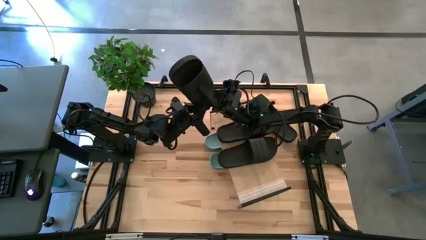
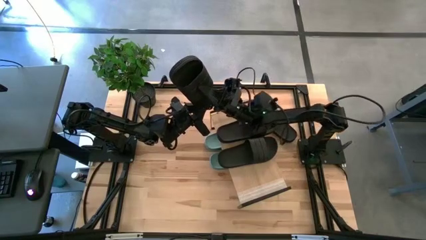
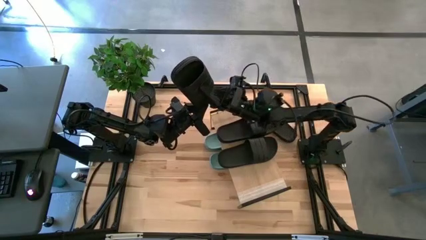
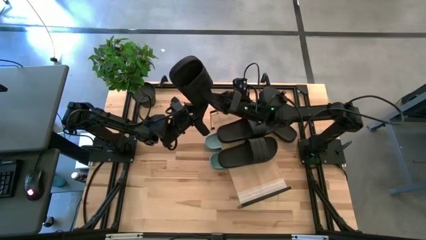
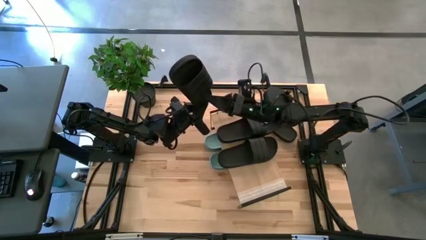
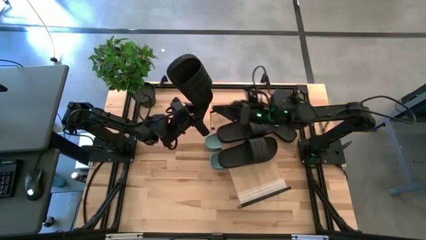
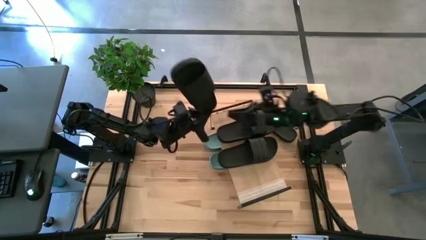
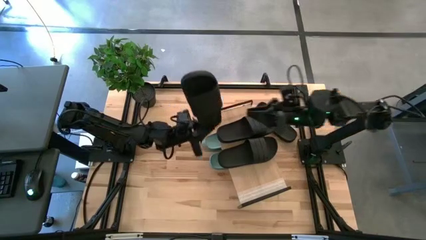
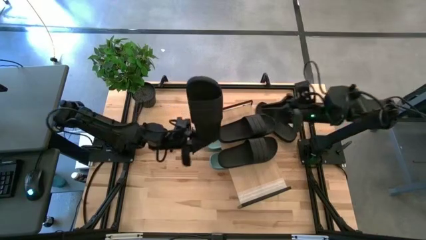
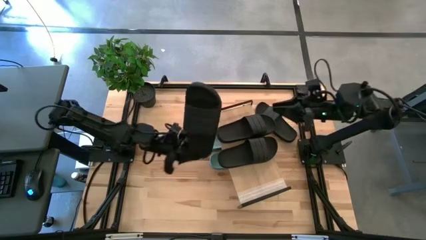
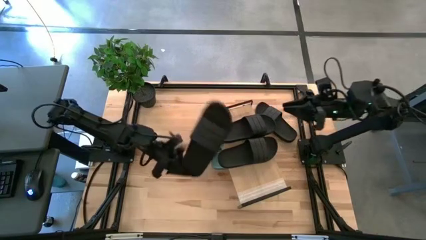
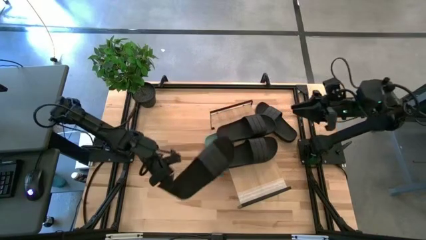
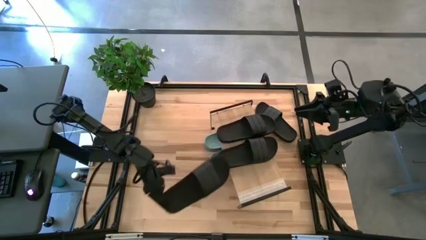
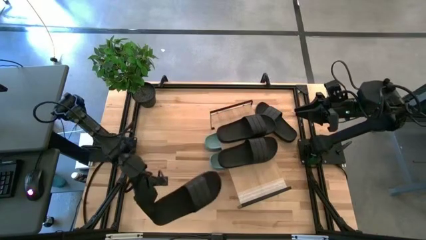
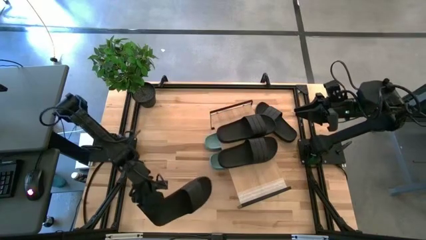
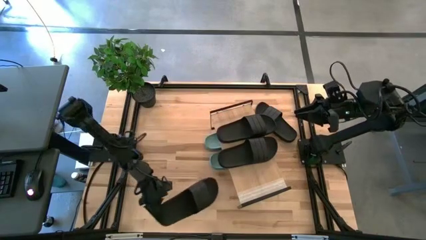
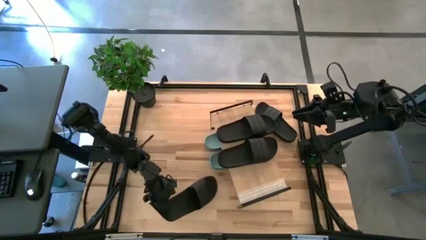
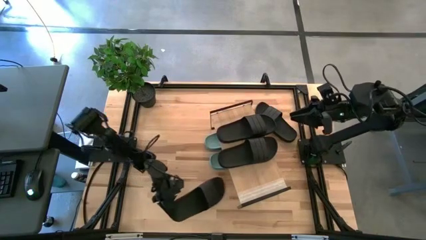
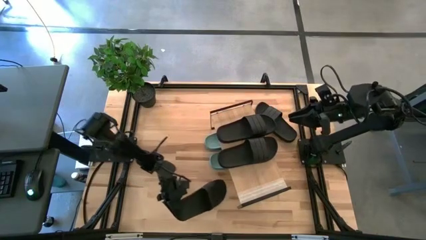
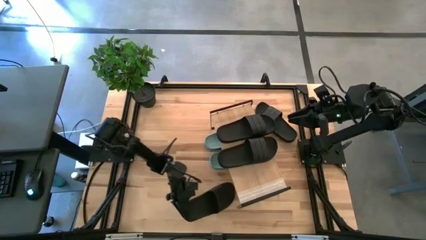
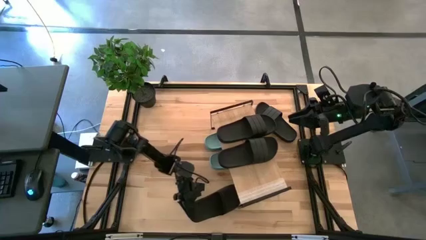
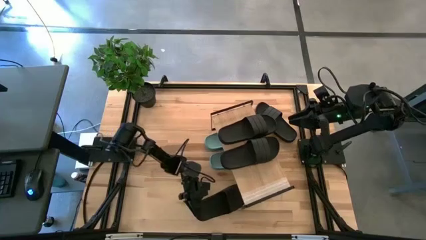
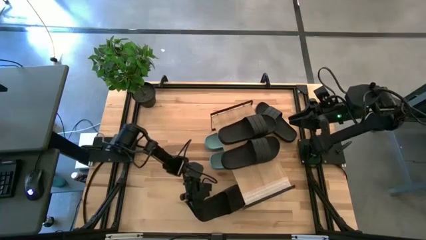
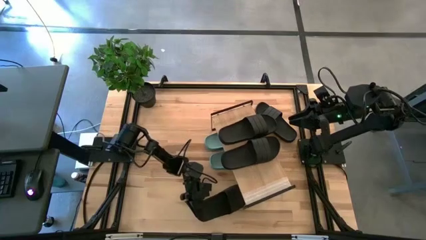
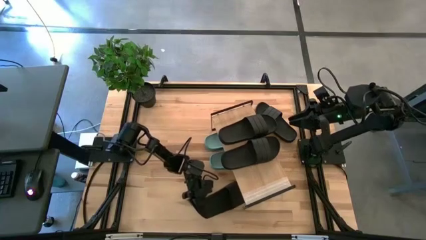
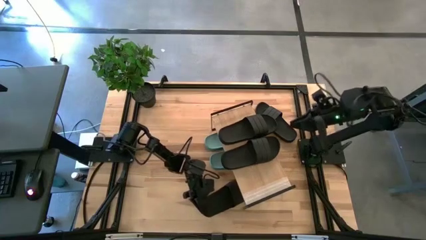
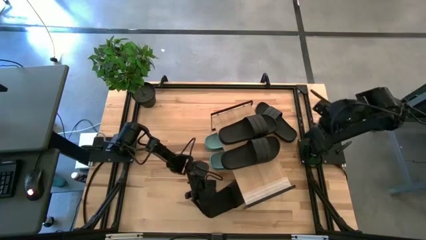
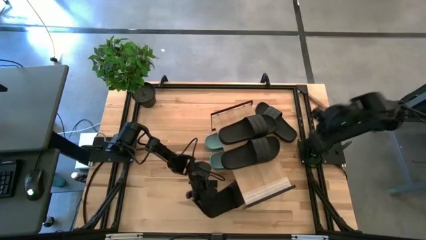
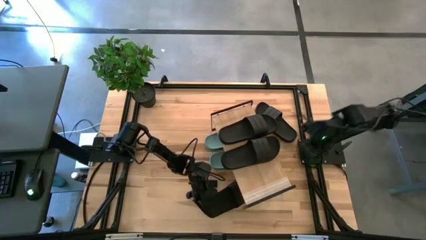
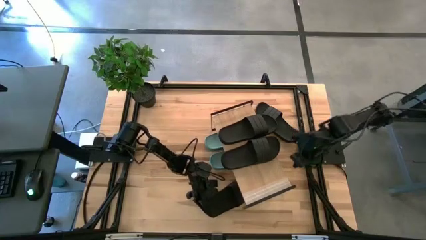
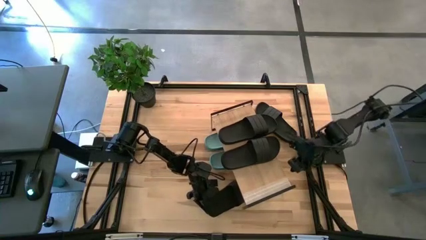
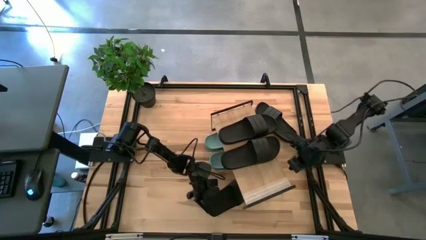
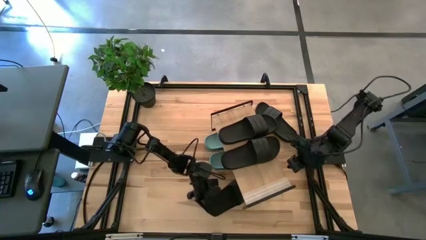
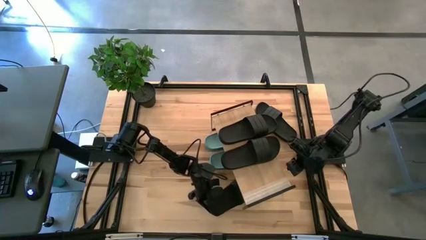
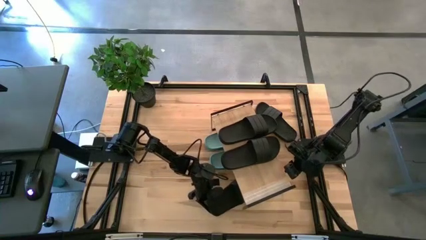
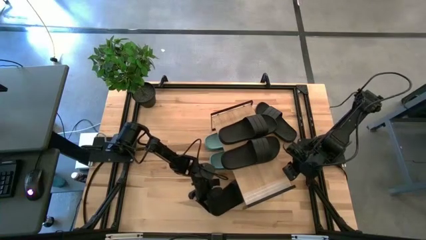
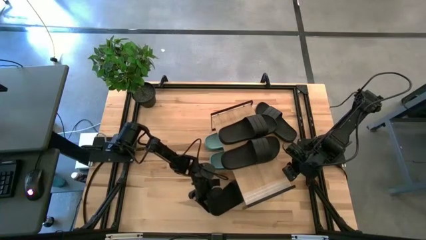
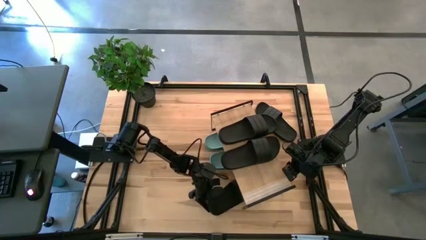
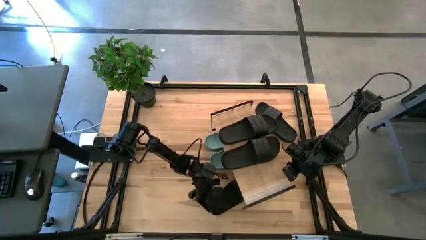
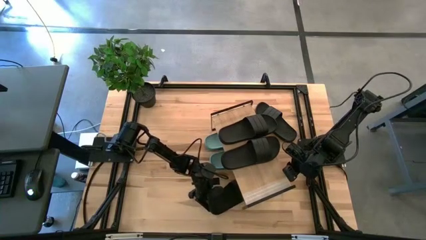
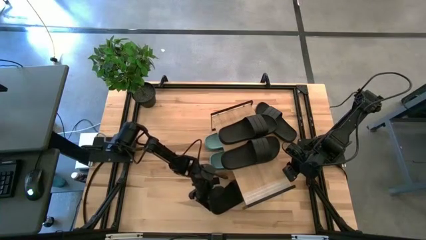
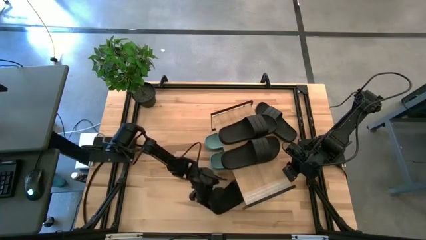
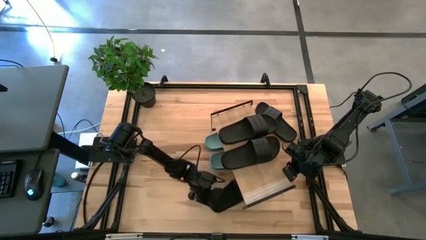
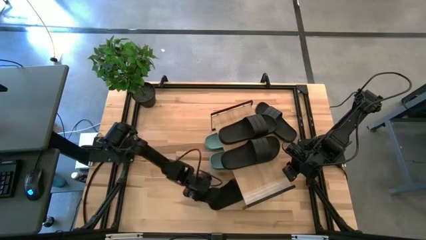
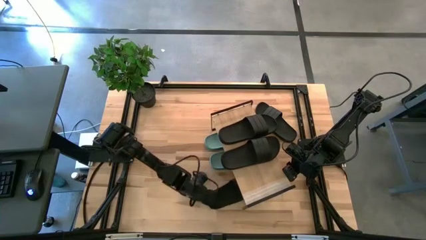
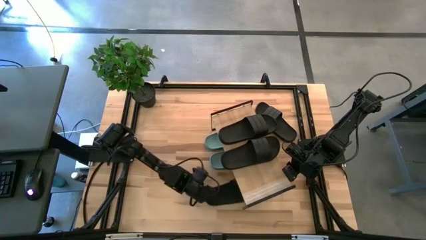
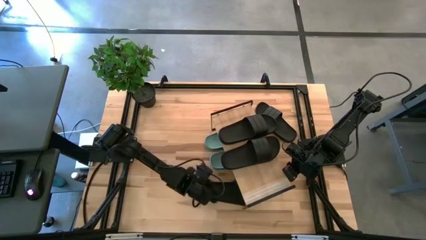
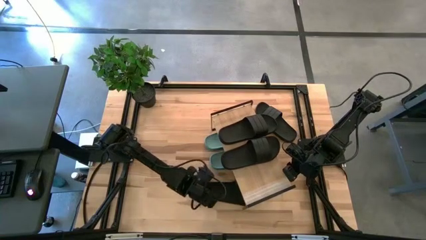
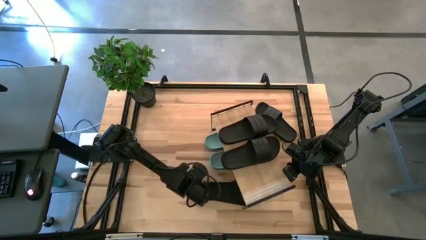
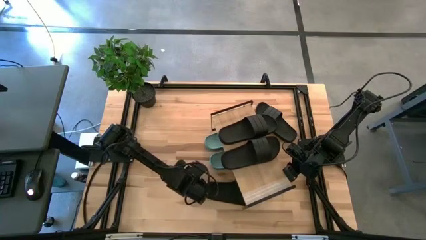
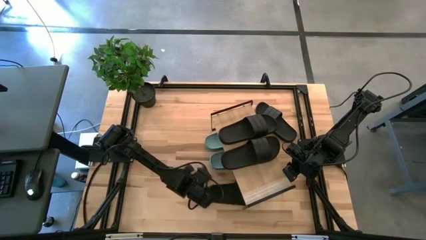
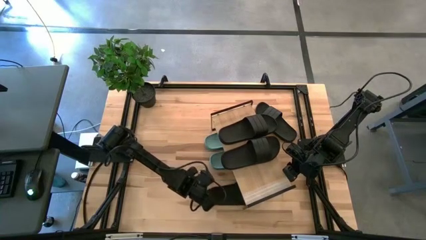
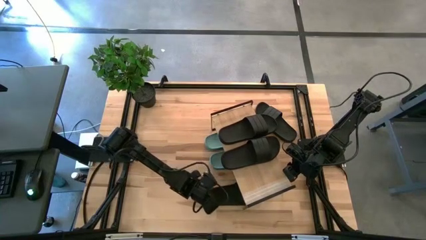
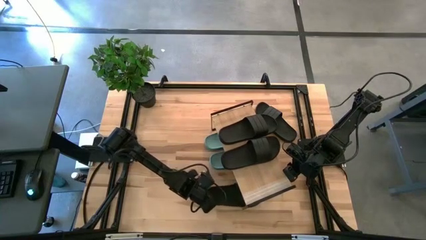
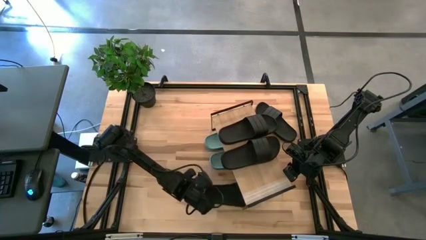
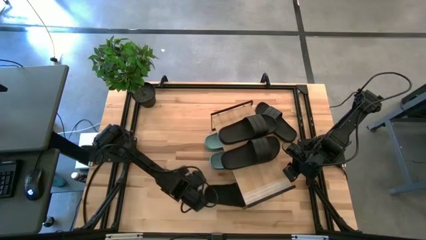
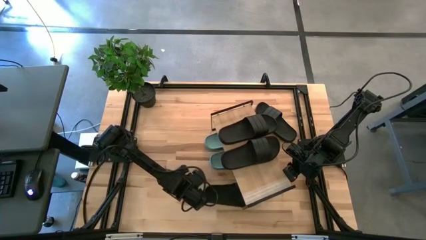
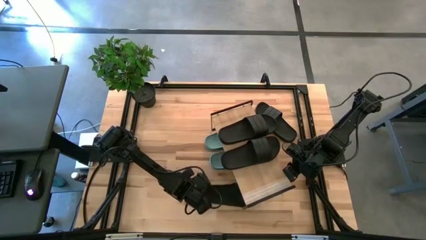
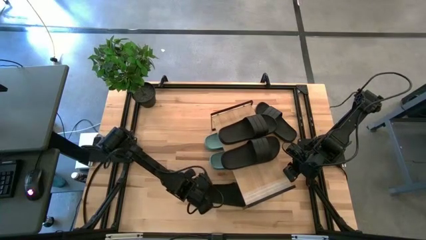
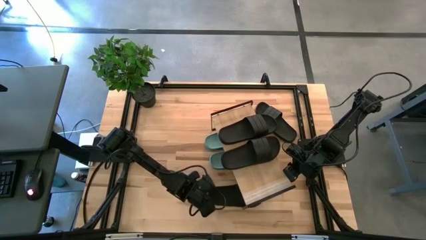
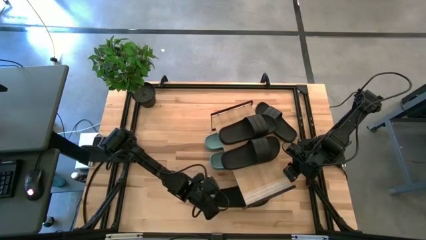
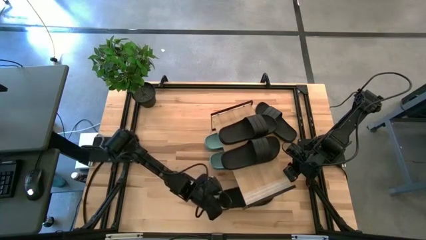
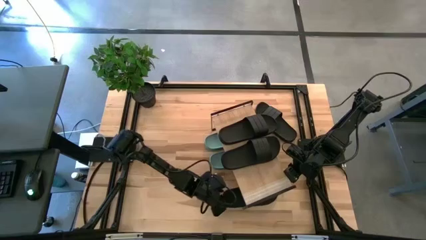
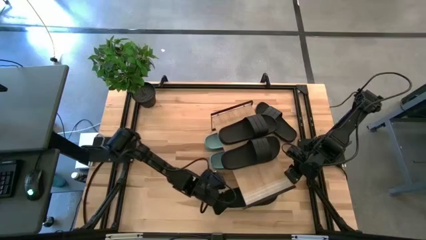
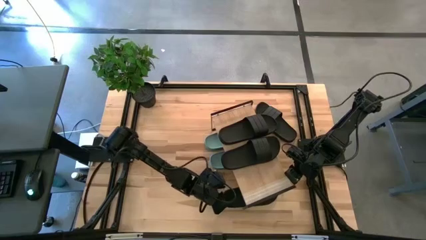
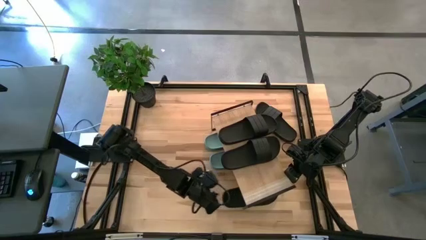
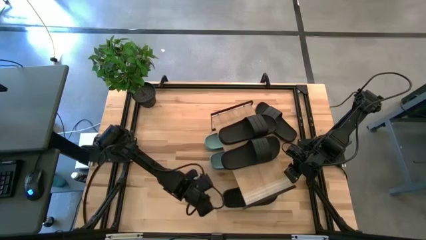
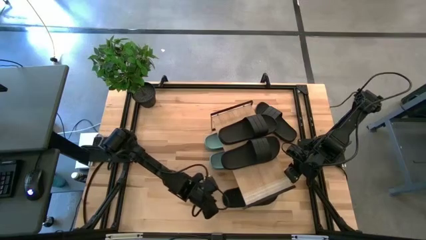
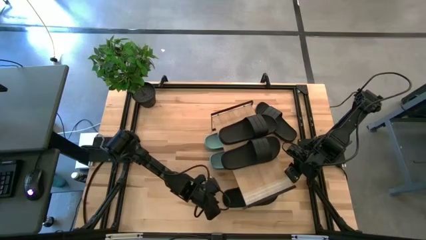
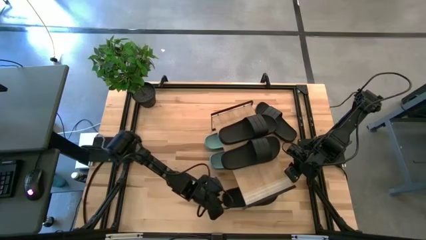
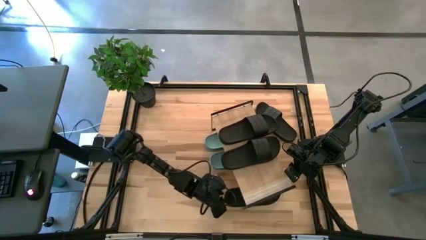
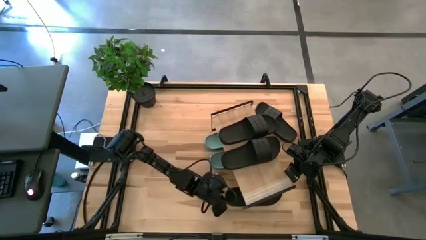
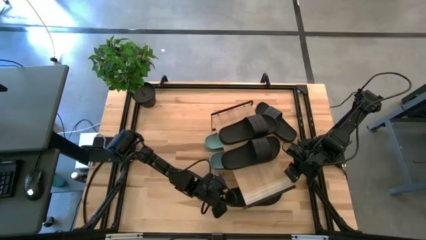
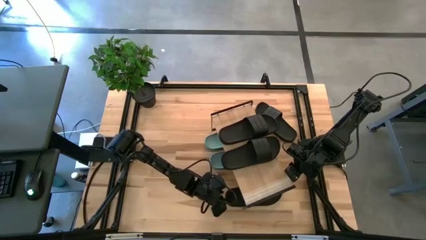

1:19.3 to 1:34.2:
Task: Pick and place slides into the shelf
Put the black slides under the shelf
